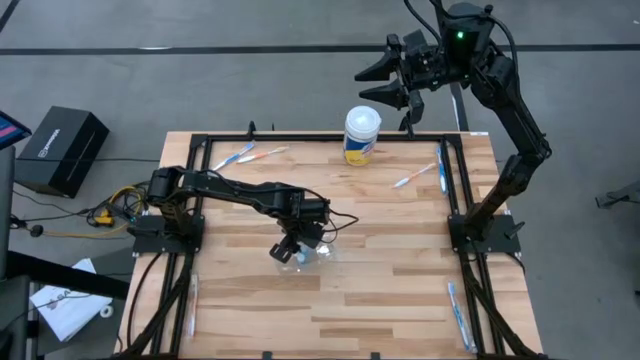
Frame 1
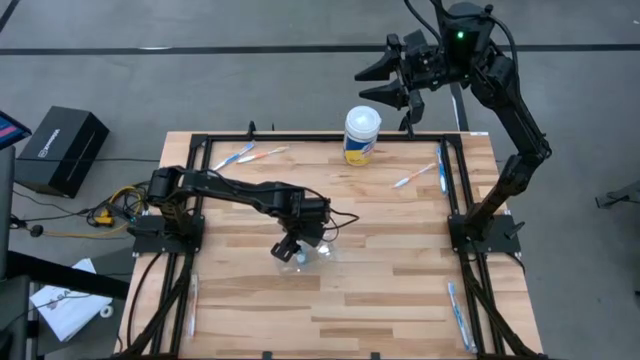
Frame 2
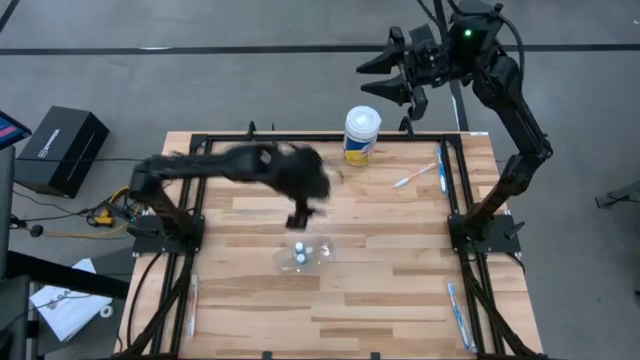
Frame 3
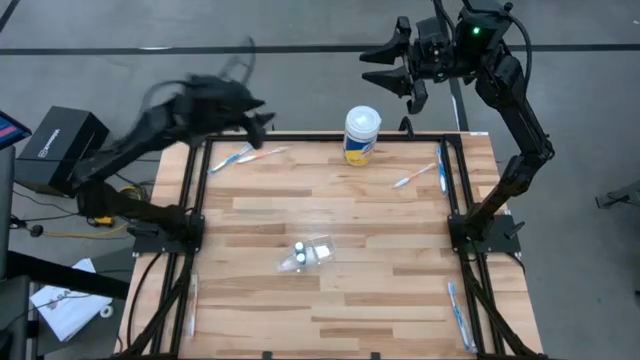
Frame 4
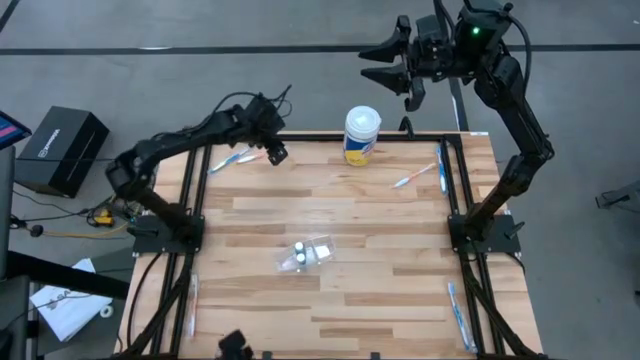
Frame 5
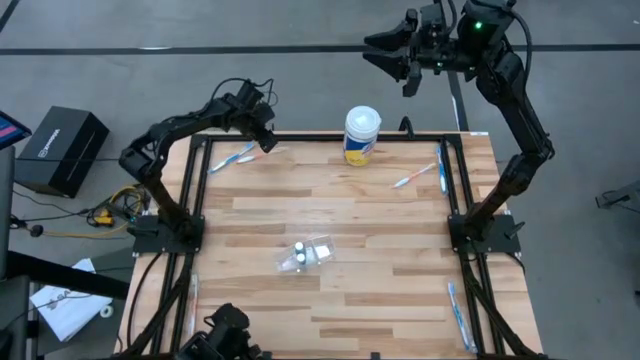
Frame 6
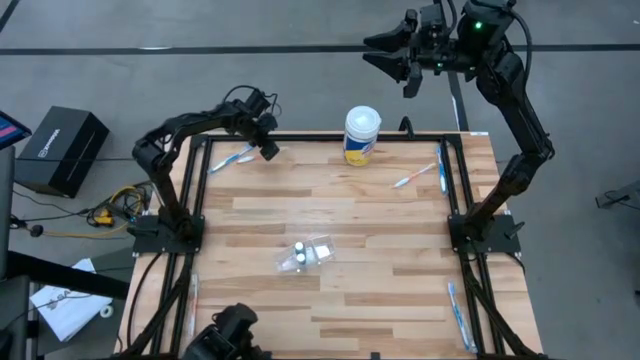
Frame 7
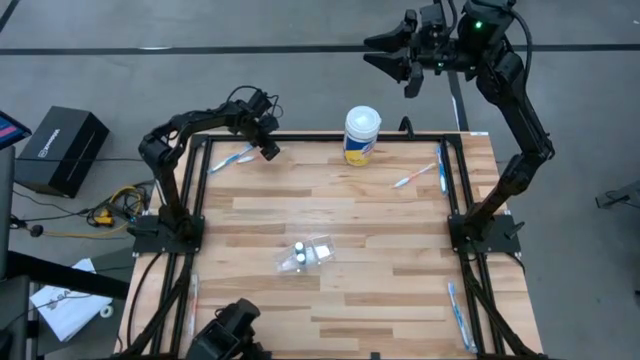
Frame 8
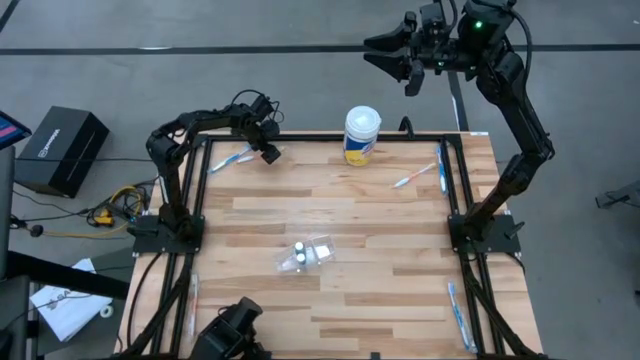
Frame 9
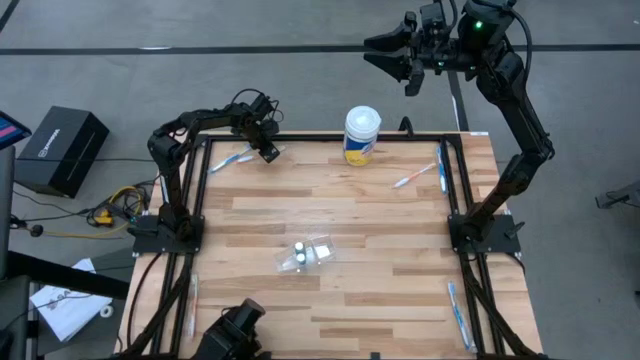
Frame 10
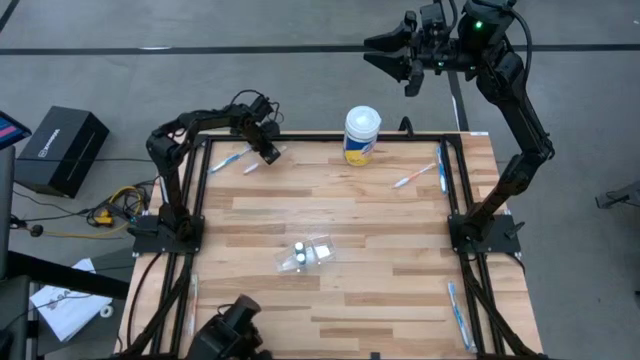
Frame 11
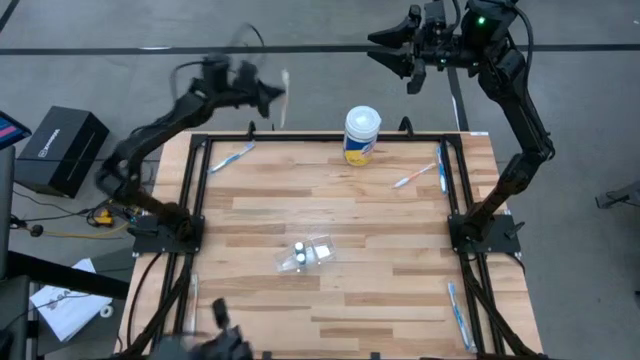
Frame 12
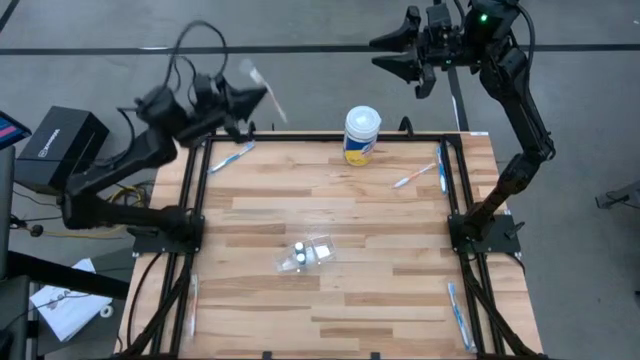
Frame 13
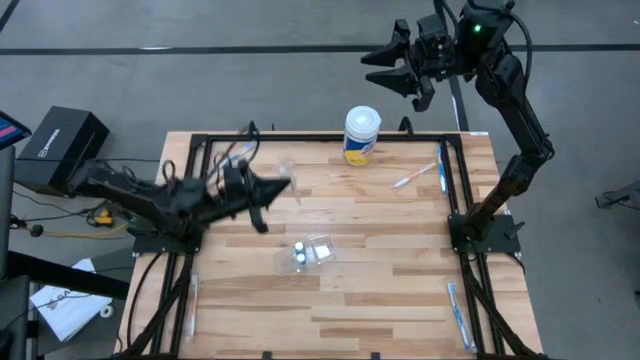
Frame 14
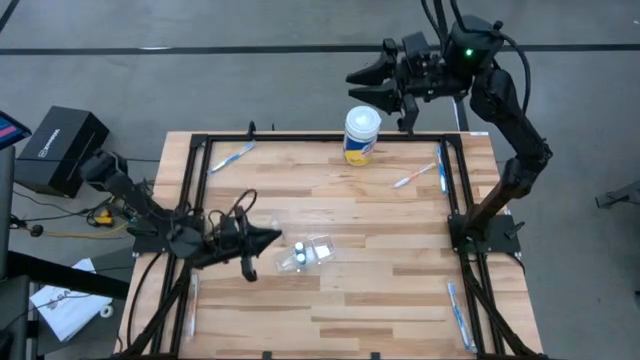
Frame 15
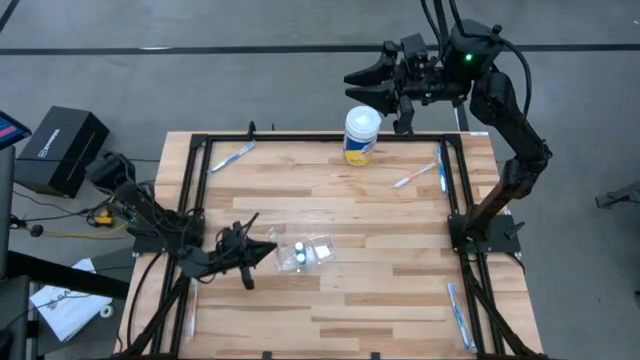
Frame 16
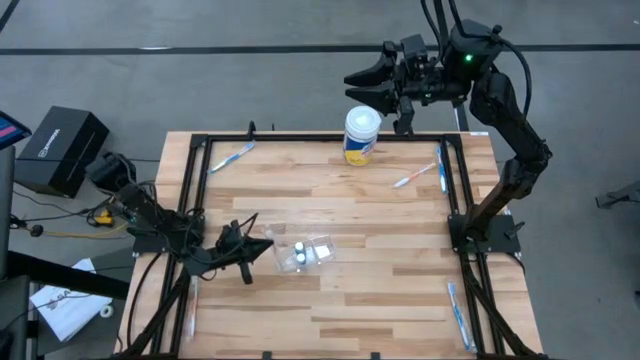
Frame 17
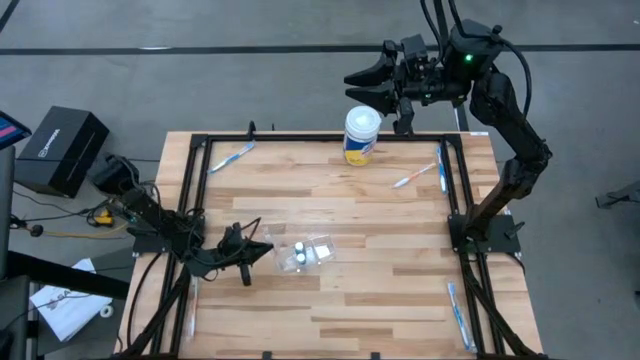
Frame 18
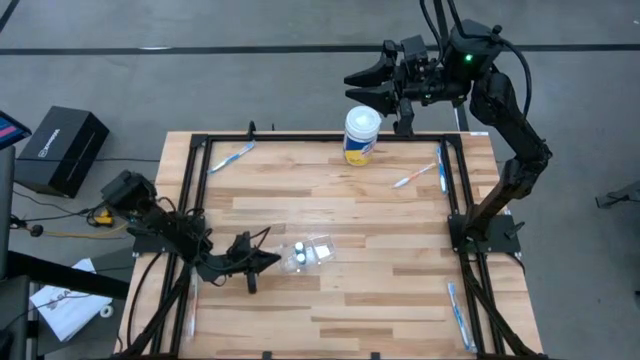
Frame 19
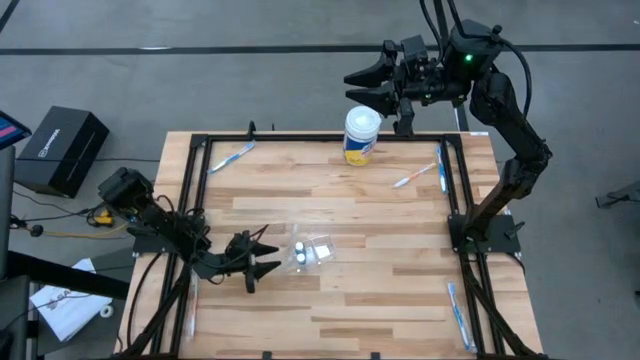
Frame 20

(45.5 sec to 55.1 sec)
Task: Pick & Place toothbrushing station
Put the top orange toothbrush into the transparent organizer

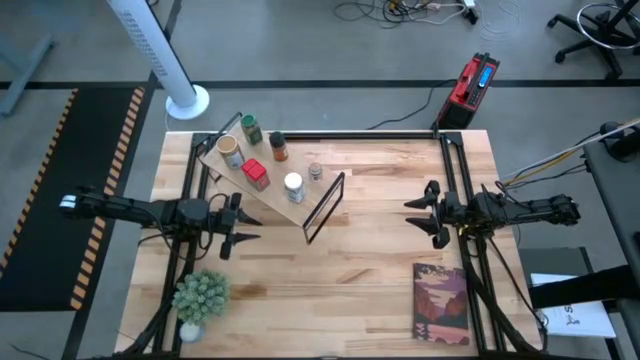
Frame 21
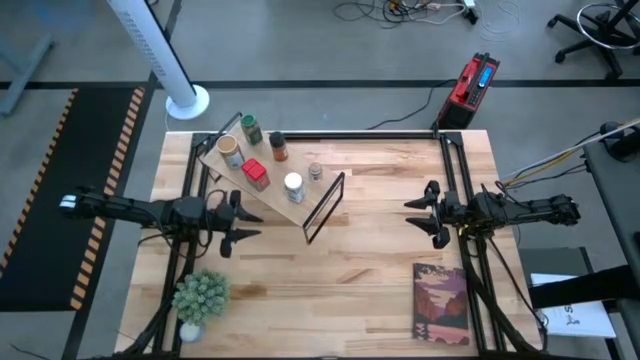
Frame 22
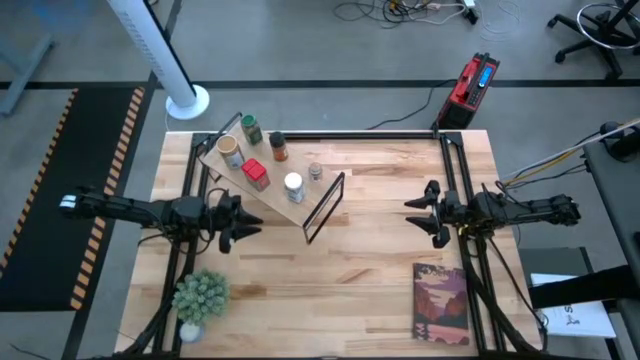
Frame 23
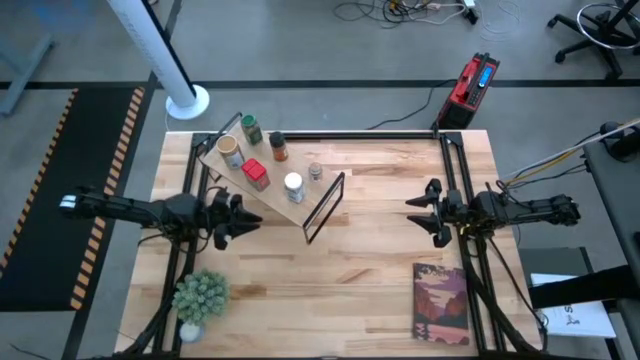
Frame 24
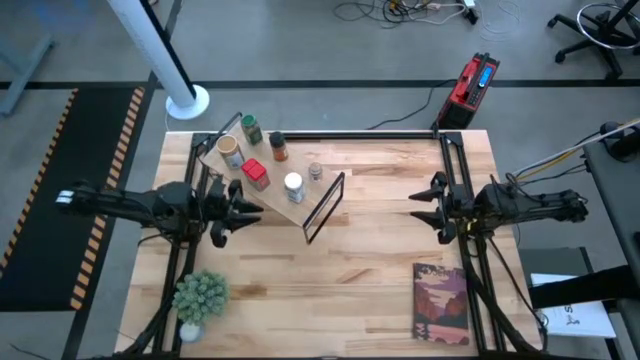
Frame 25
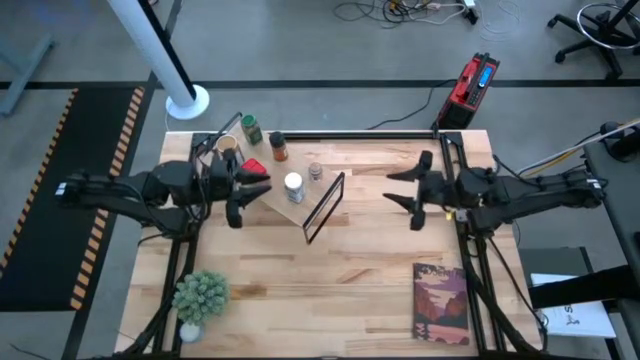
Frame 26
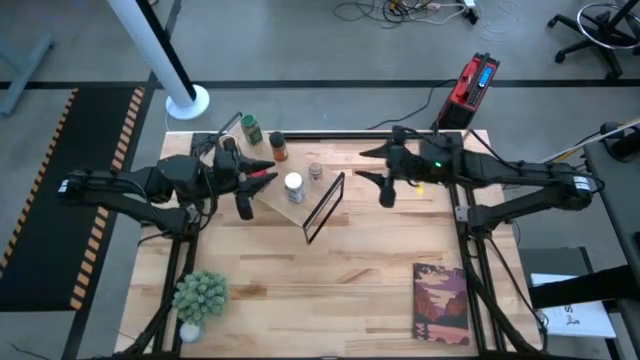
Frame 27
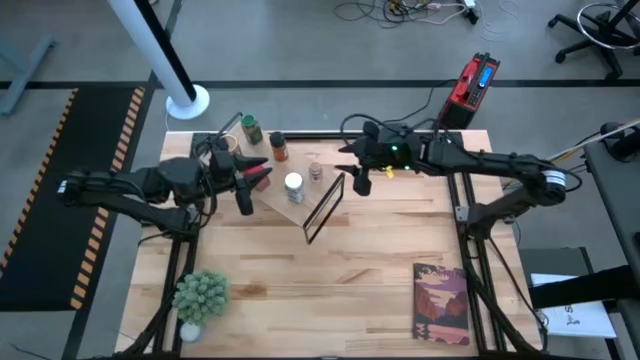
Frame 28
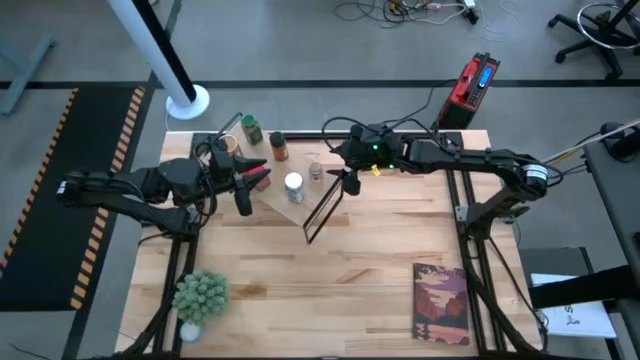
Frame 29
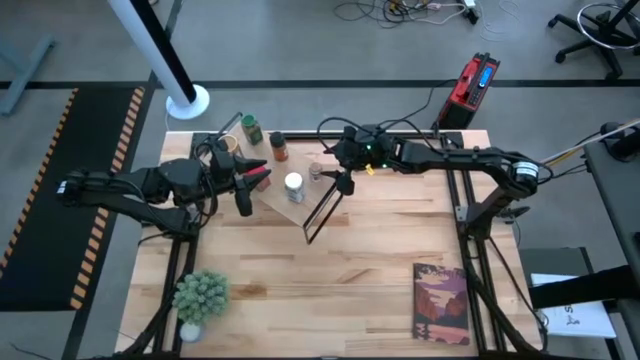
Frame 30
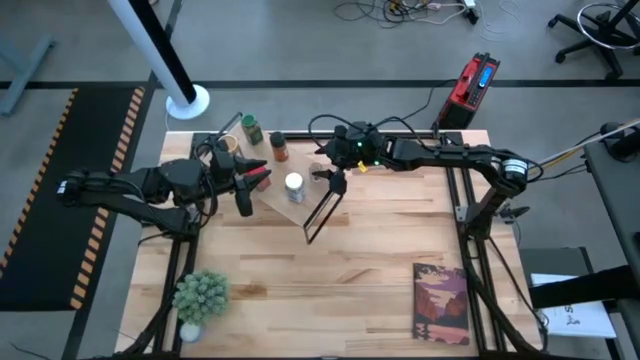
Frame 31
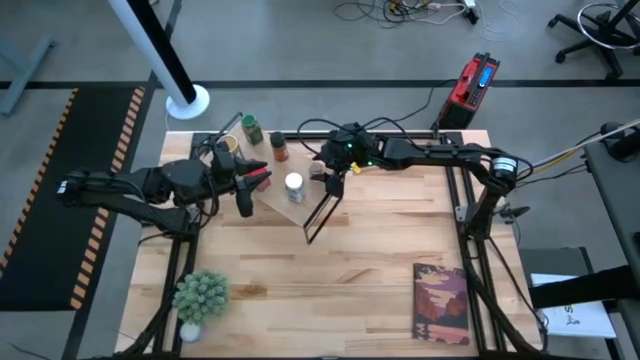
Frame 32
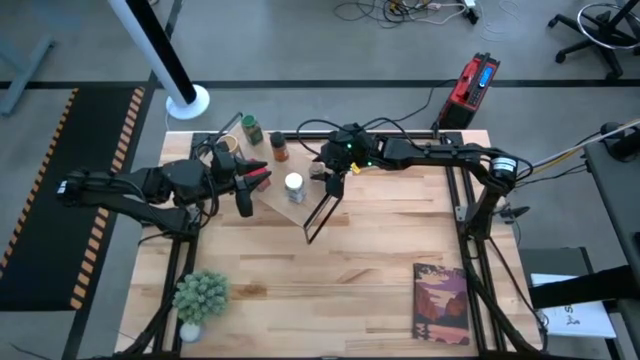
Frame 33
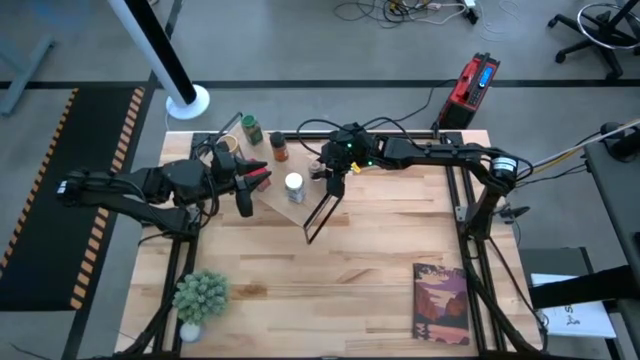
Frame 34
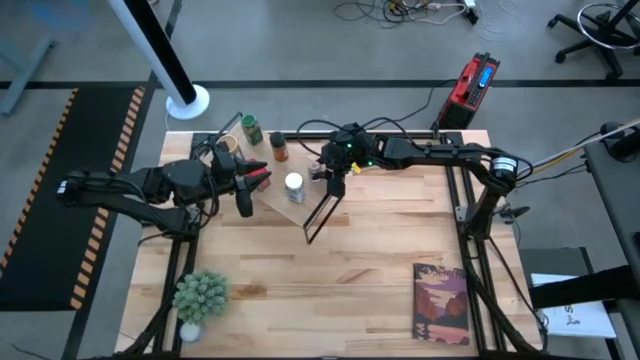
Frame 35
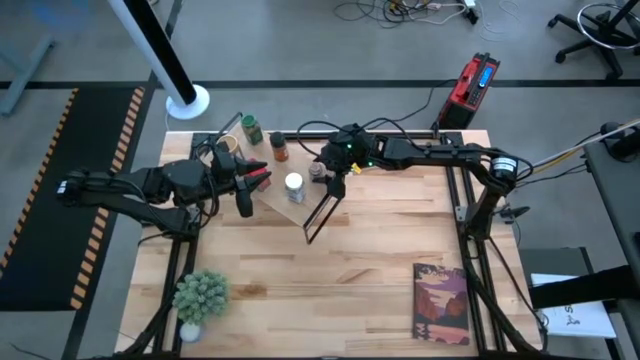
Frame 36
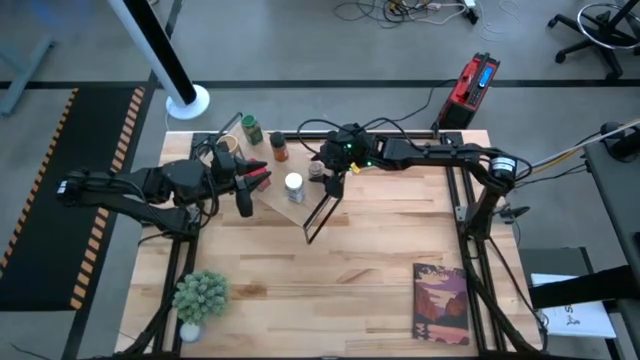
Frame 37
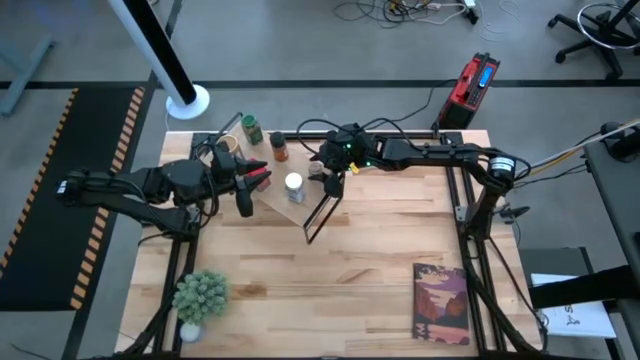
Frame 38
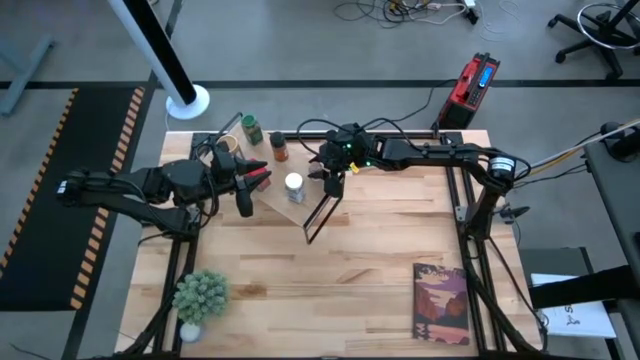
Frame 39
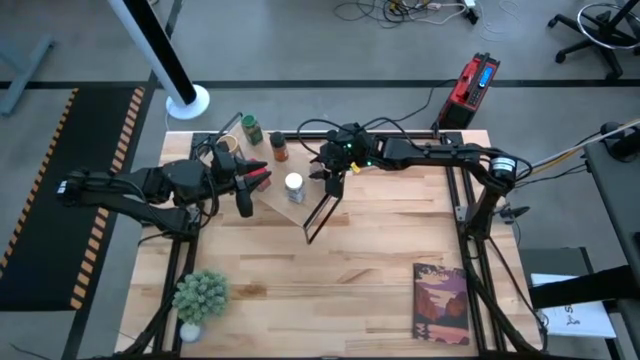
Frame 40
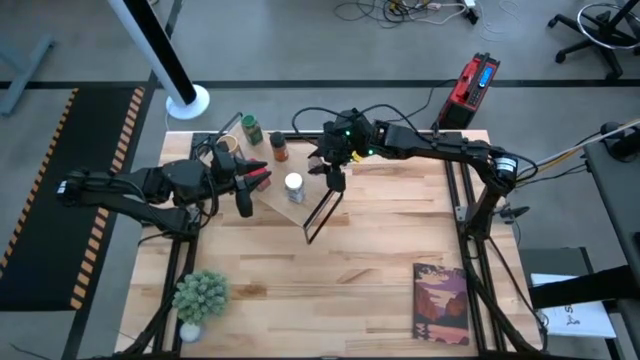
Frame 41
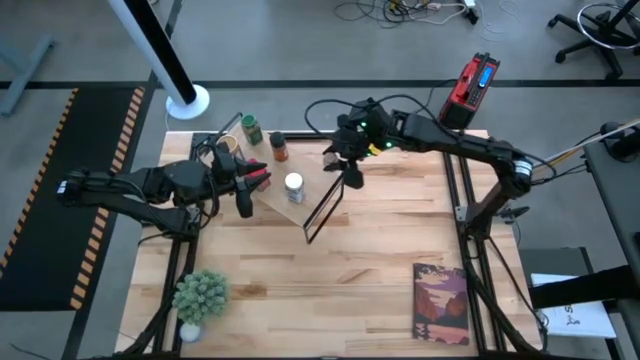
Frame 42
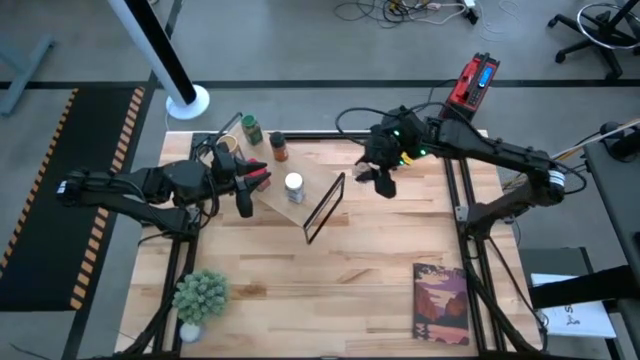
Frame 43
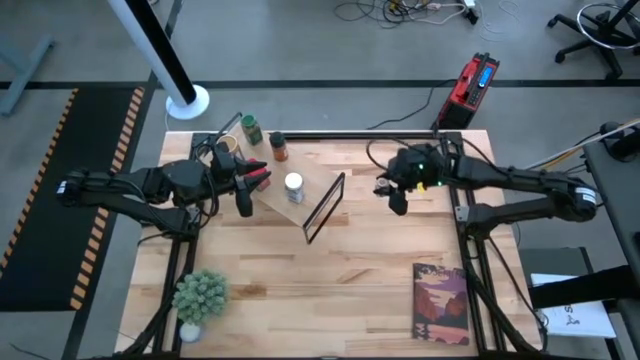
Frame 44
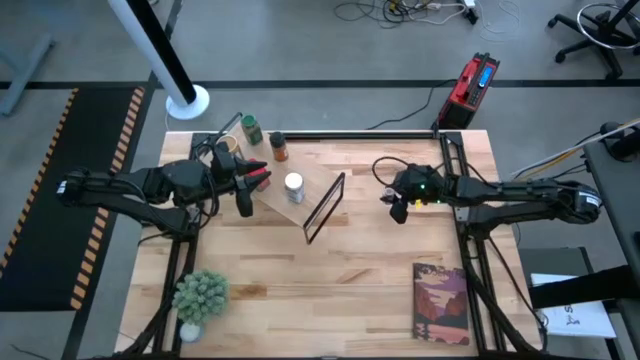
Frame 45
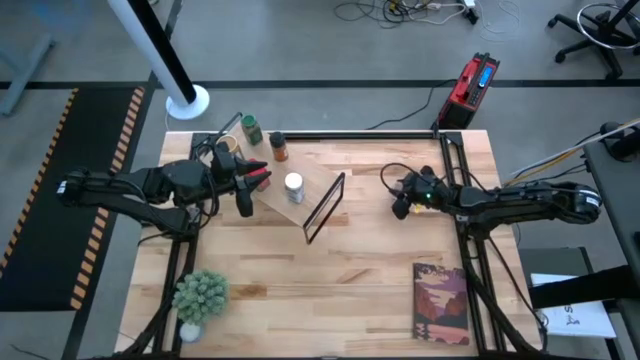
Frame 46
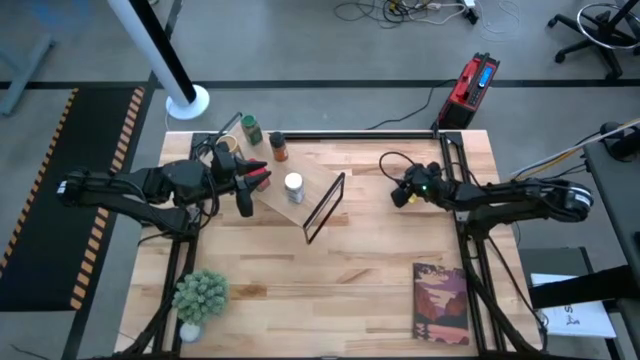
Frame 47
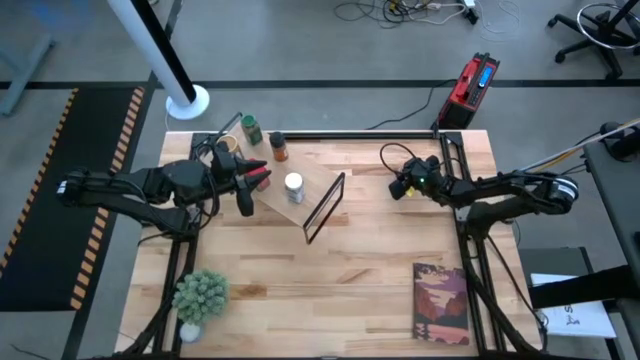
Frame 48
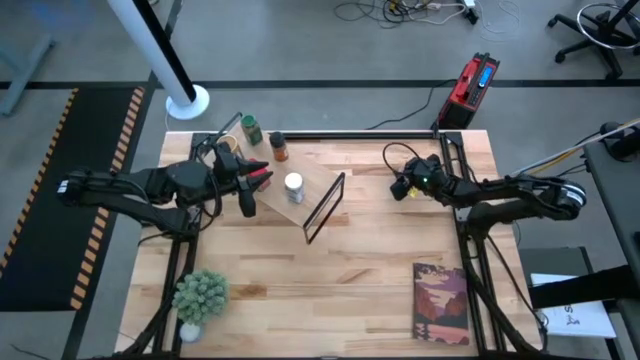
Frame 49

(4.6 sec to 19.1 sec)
Task: Shelf spices
Remove the brown seasoning bottle from the shelf
